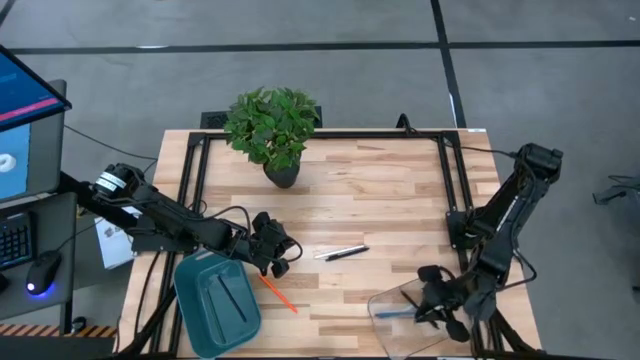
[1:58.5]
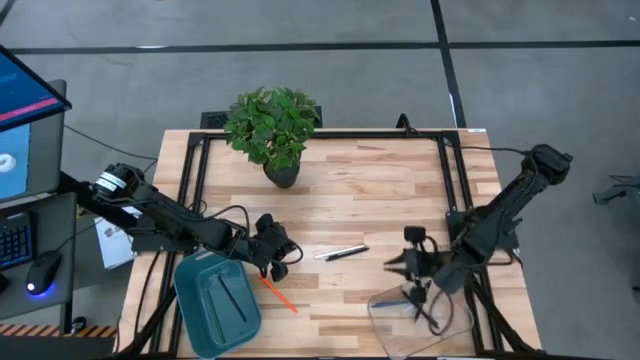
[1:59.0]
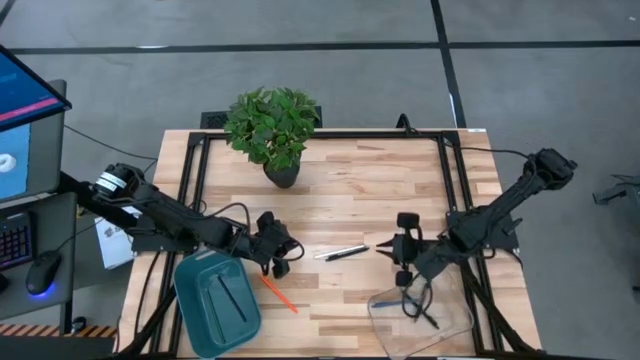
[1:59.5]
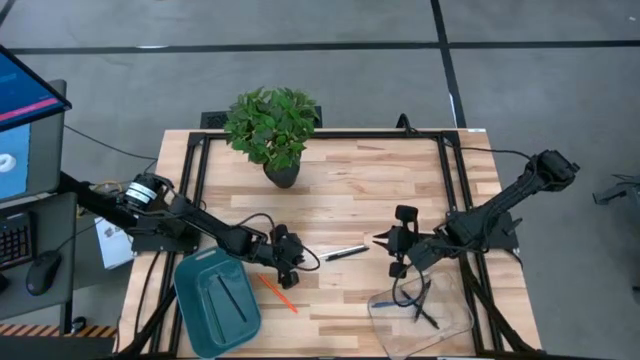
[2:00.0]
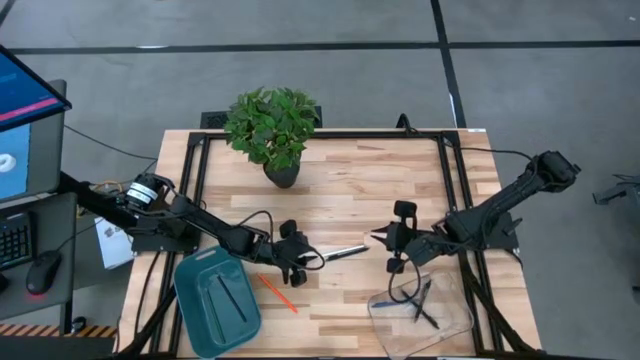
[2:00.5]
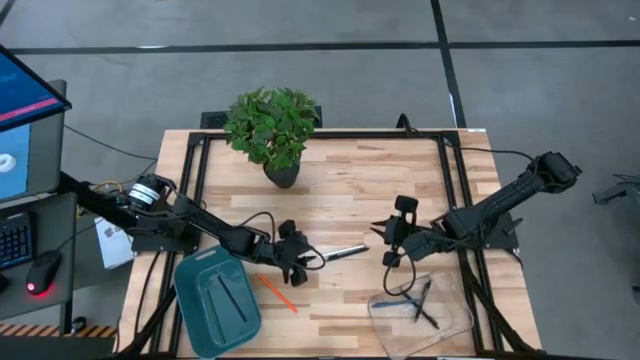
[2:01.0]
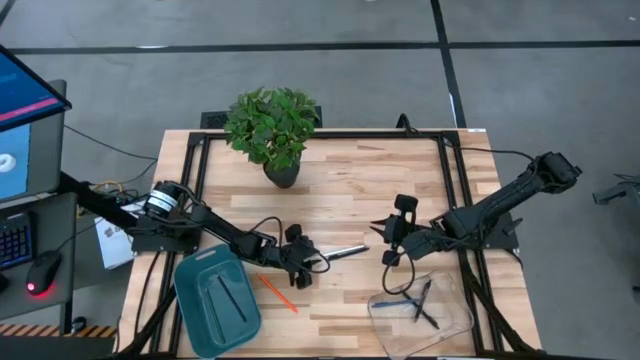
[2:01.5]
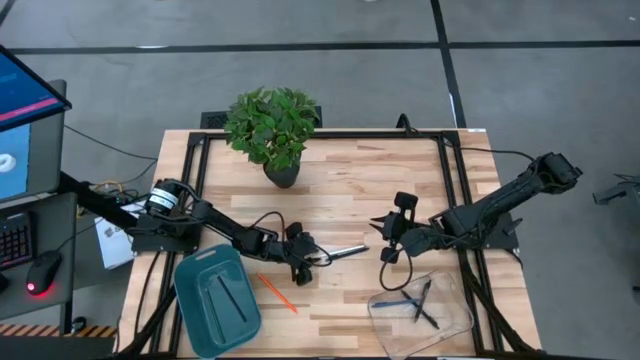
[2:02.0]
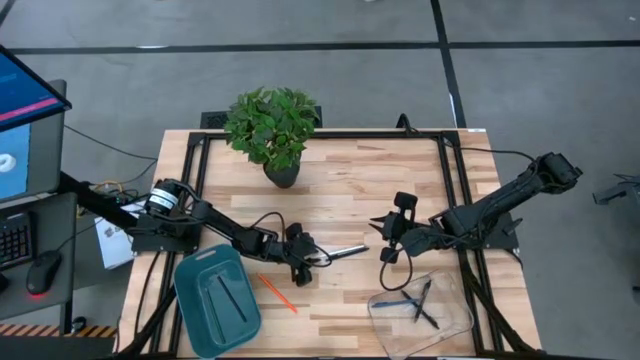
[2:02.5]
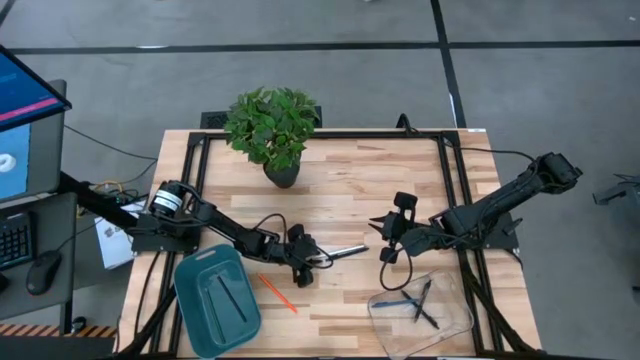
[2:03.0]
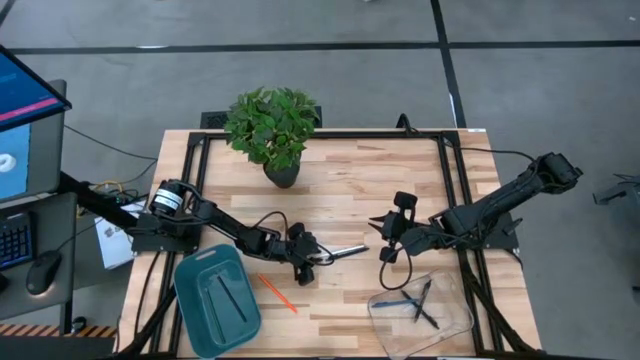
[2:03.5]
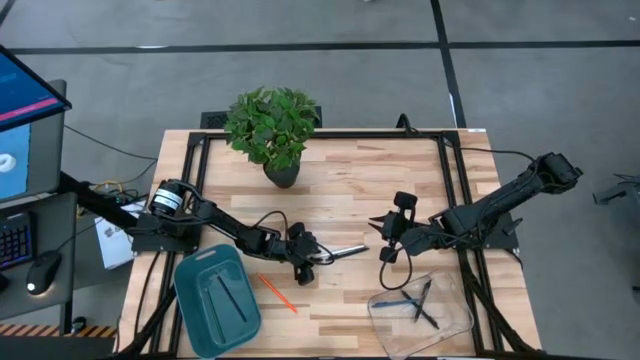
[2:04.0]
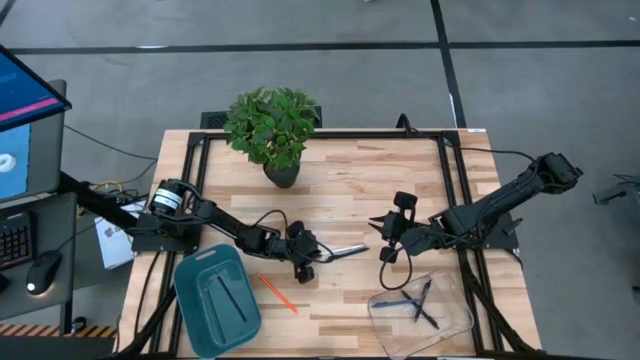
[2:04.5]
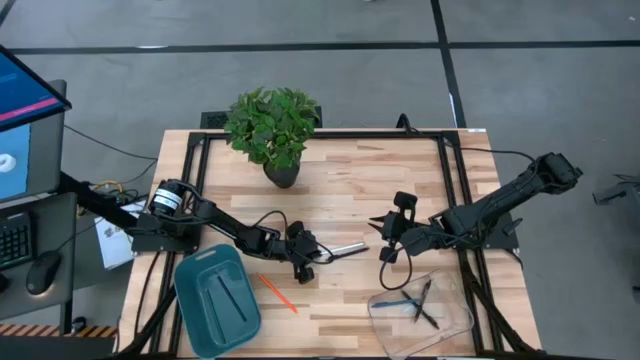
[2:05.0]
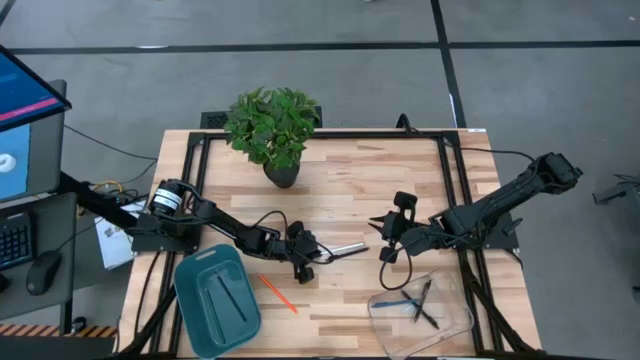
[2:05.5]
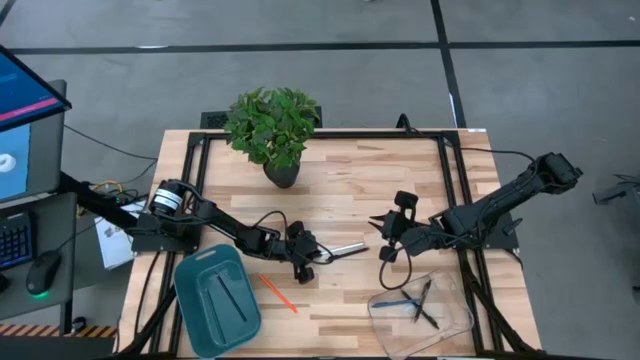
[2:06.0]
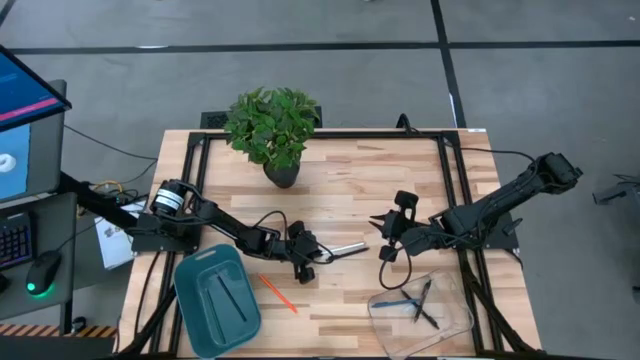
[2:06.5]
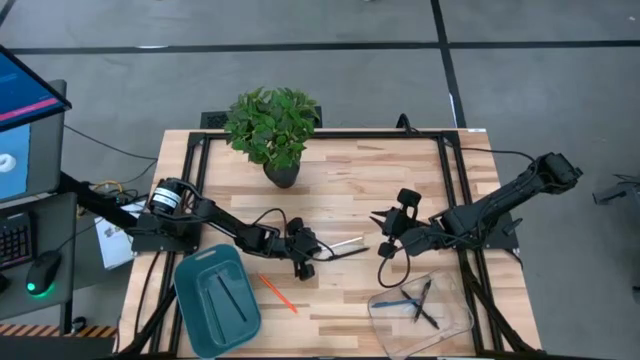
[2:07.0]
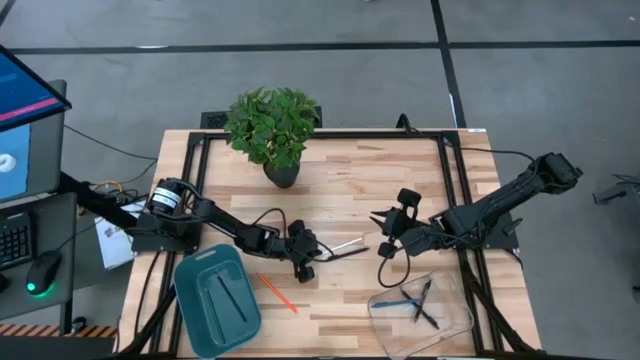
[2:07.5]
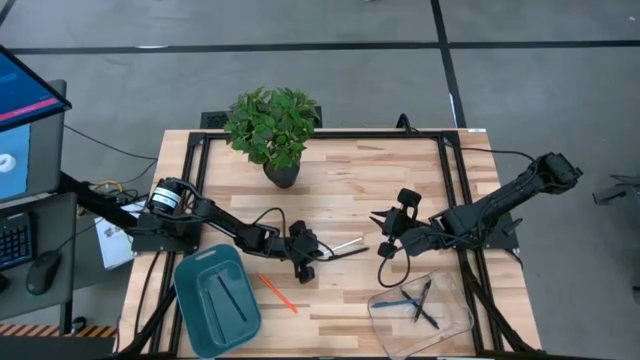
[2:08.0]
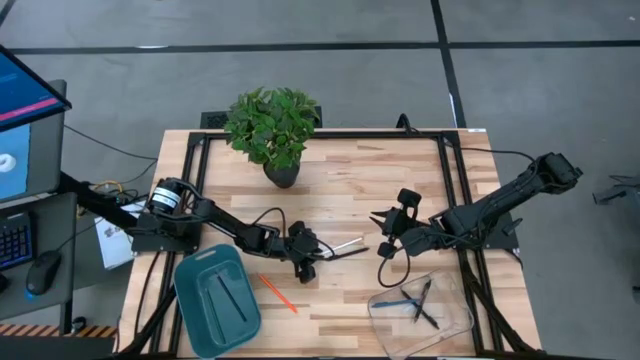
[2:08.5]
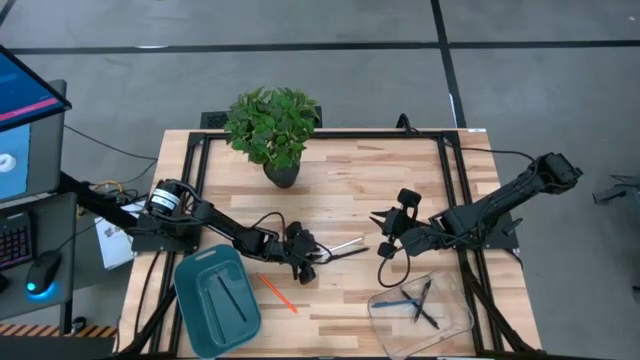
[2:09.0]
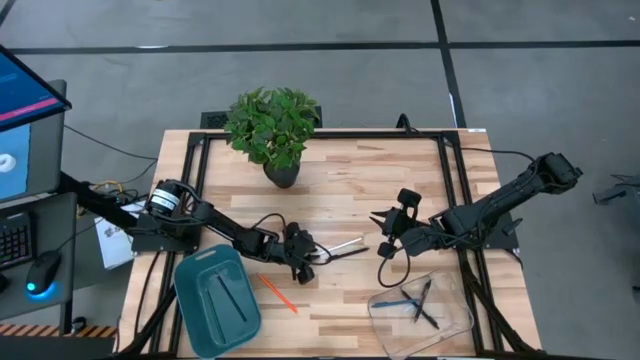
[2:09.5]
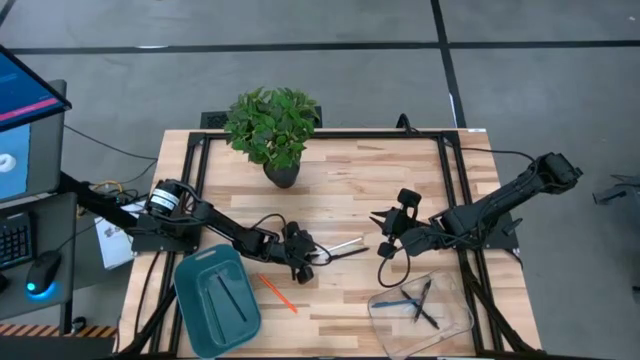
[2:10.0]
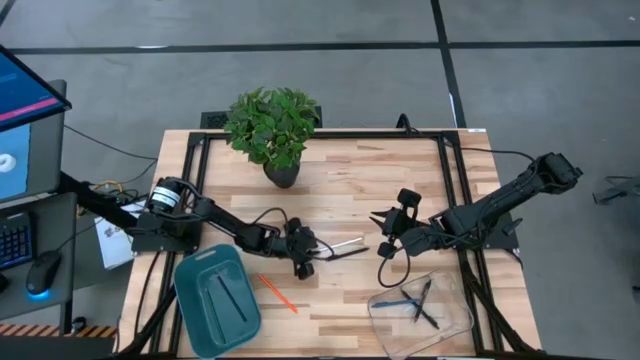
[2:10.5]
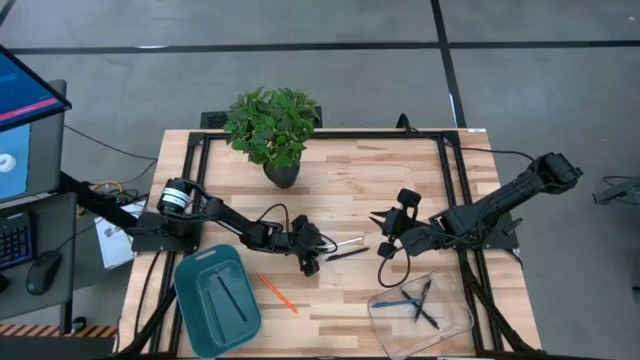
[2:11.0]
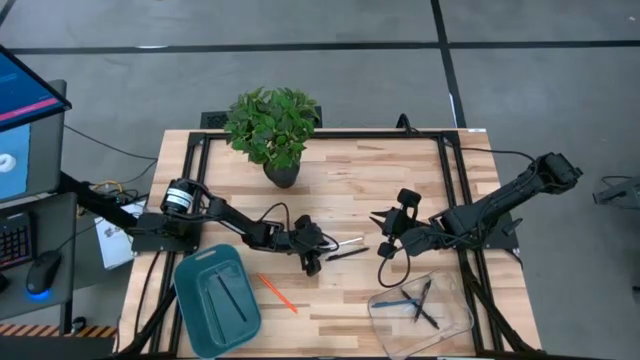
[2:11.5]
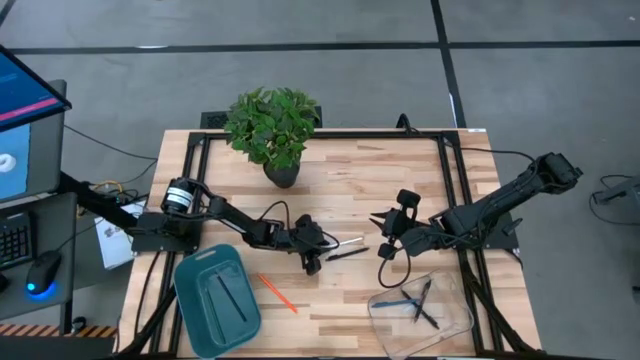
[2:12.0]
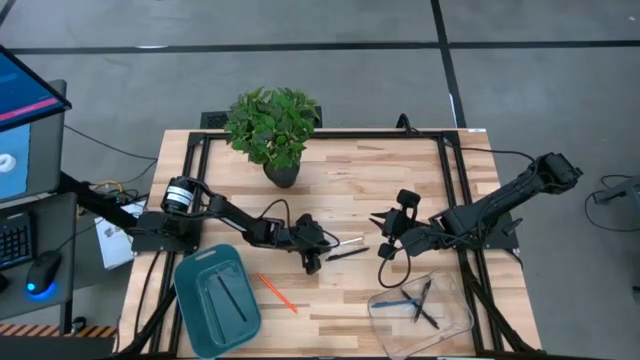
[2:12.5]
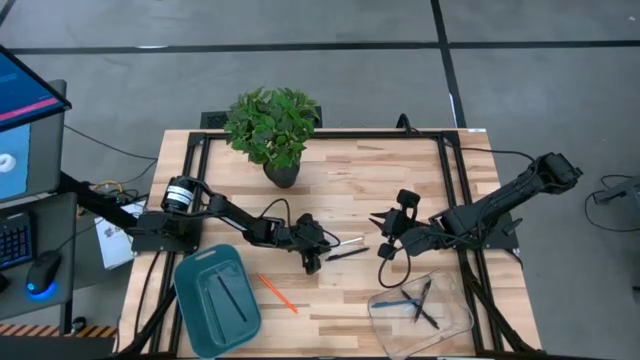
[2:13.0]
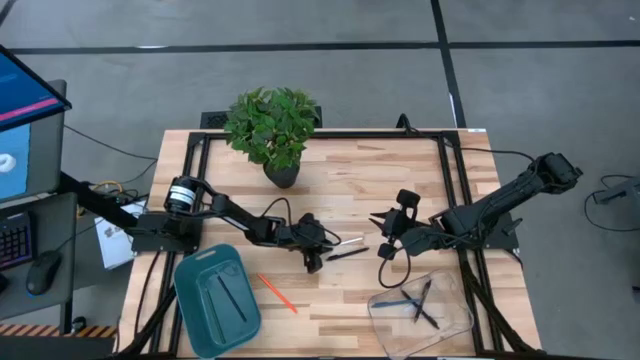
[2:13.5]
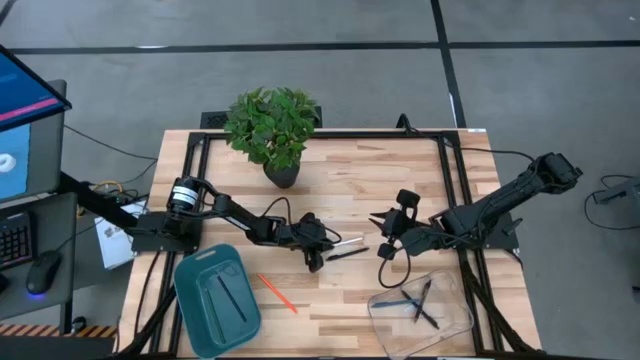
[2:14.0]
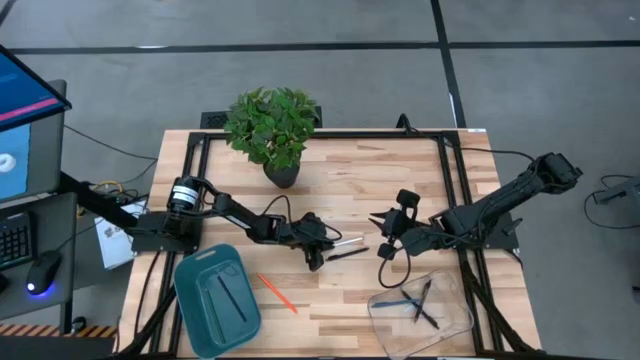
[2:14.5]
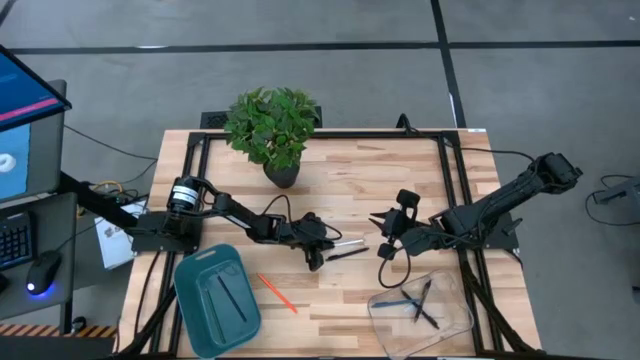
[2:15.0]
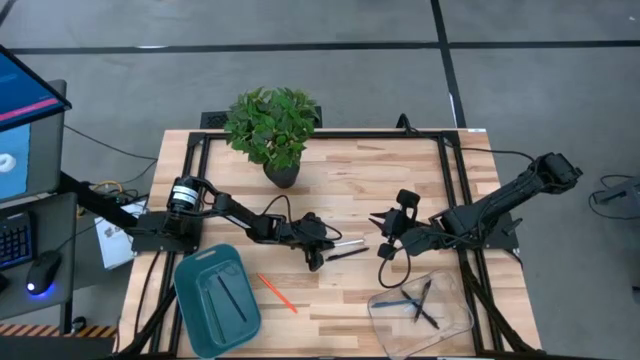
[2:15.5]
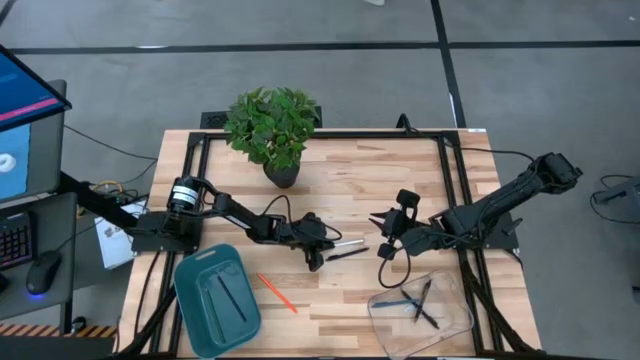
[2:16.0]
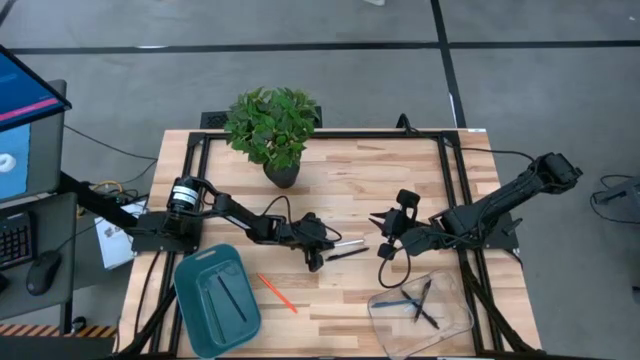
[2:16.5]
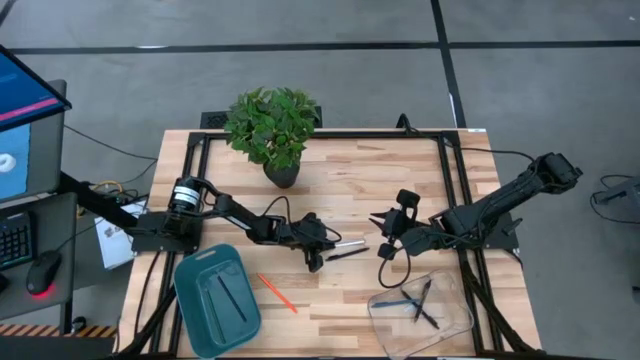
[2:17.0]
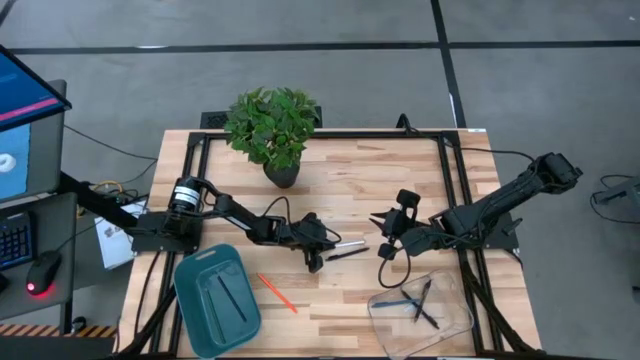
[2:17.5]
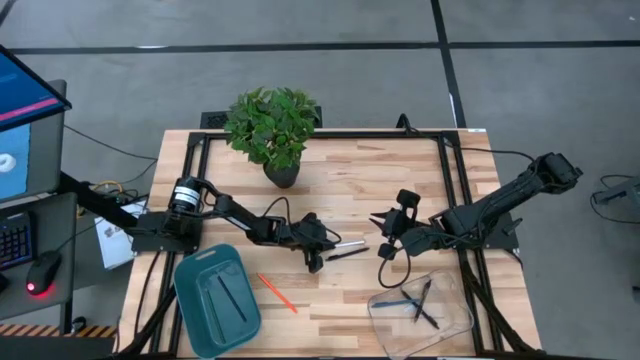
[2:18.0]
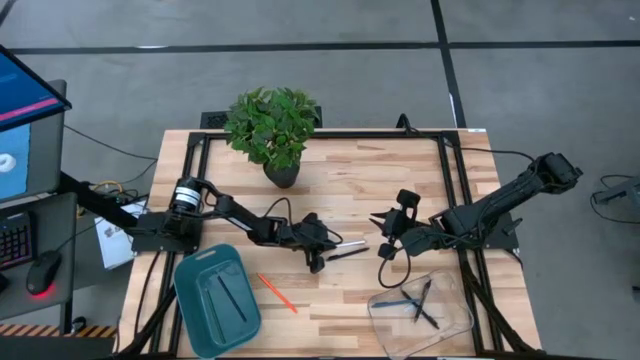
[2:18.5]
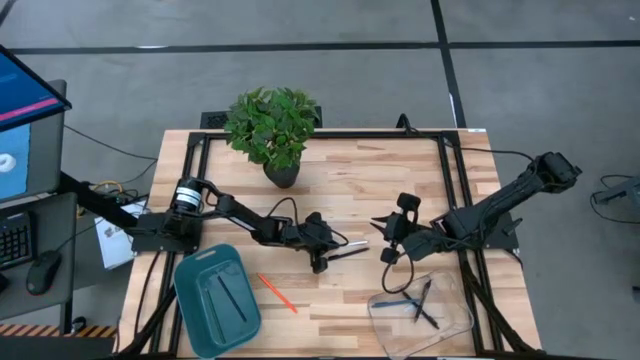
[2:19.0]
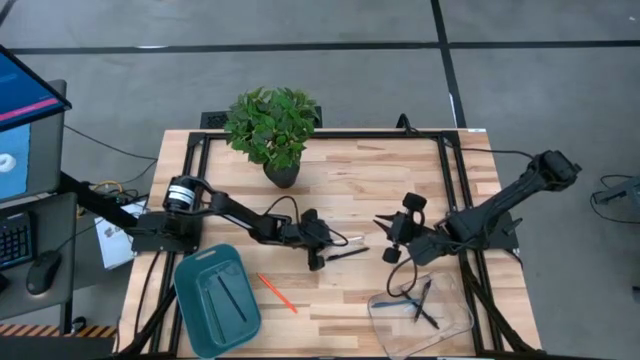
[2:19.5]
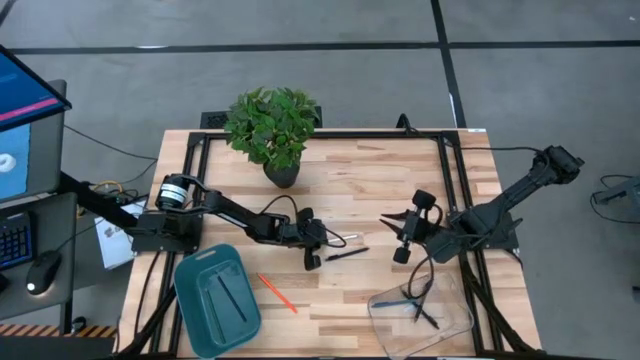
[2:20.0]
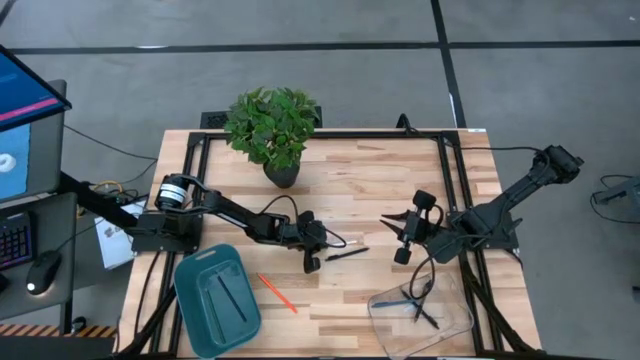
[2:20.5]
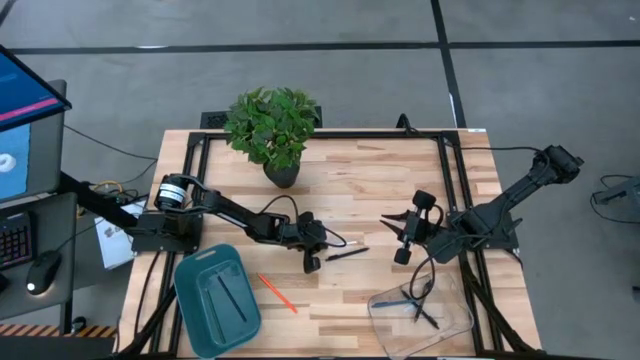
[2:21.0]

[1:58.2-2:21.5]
Task: Sort pens & pencils
Put the white pencil into the blue bin
